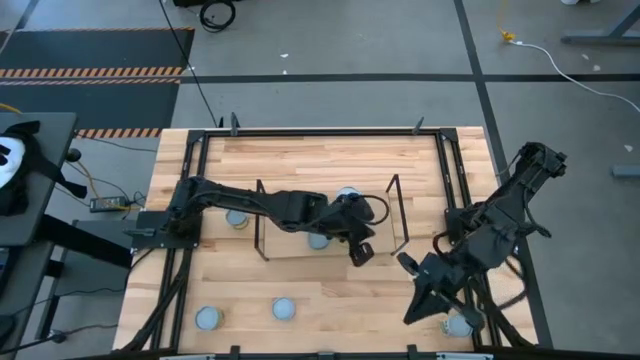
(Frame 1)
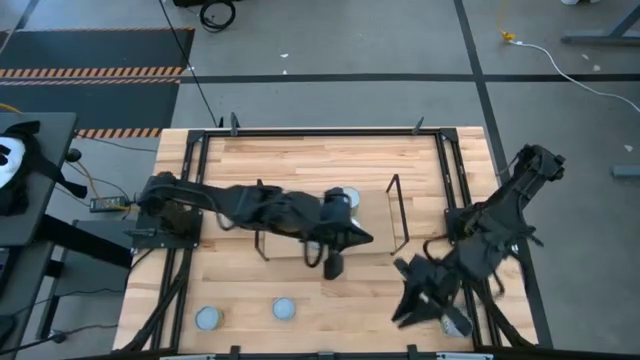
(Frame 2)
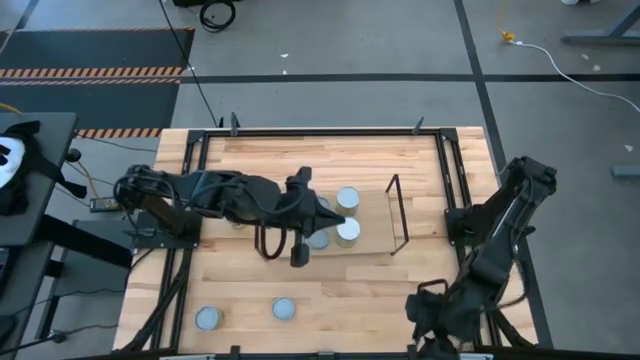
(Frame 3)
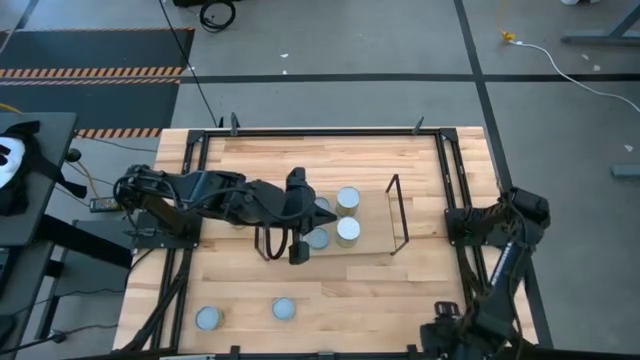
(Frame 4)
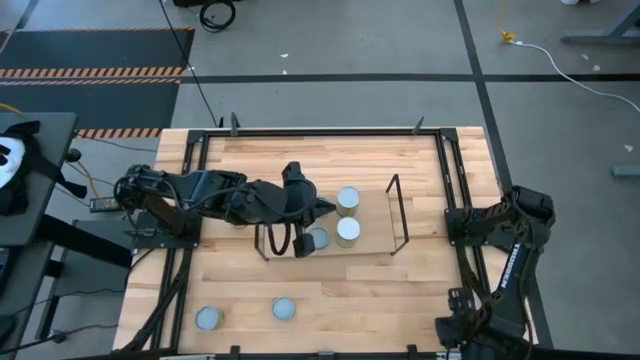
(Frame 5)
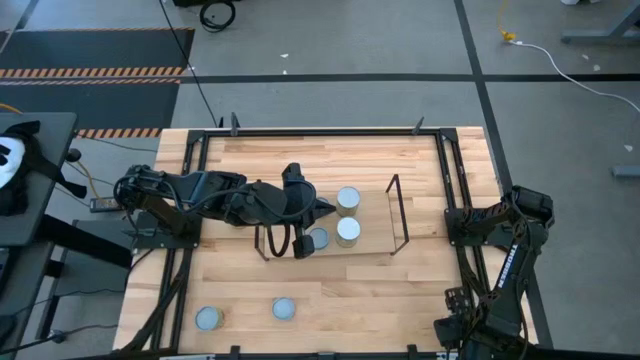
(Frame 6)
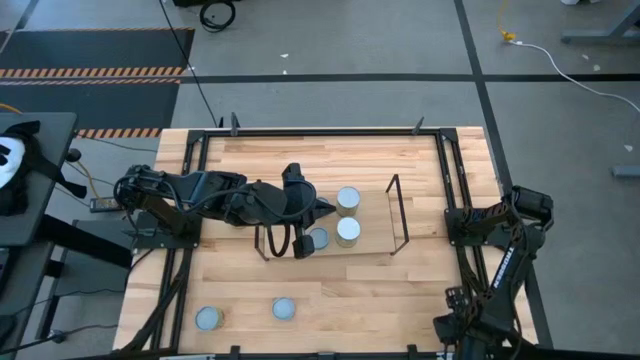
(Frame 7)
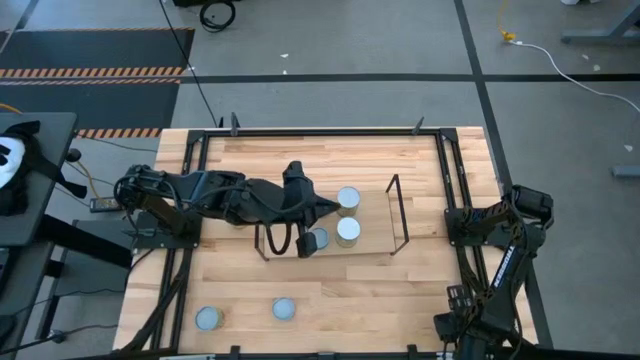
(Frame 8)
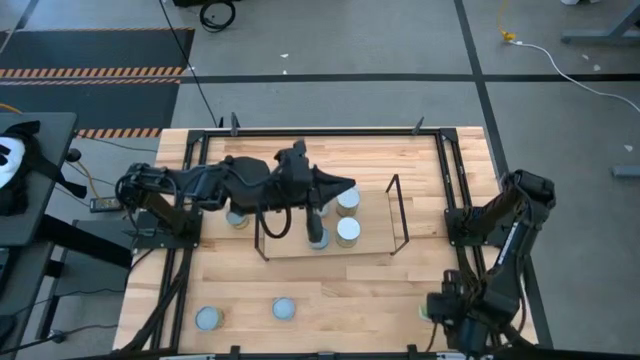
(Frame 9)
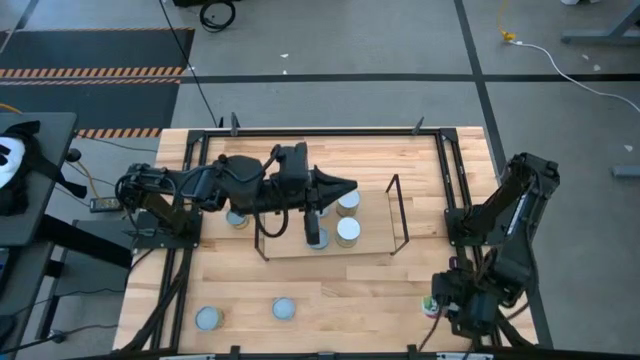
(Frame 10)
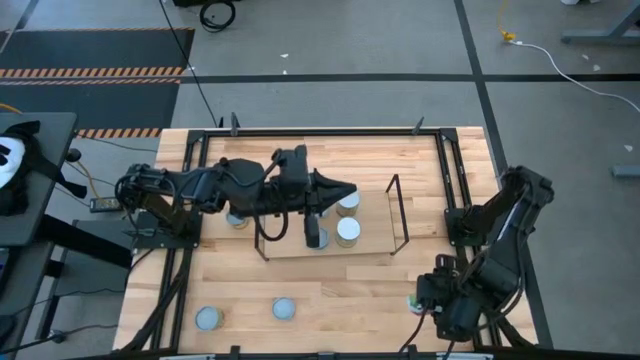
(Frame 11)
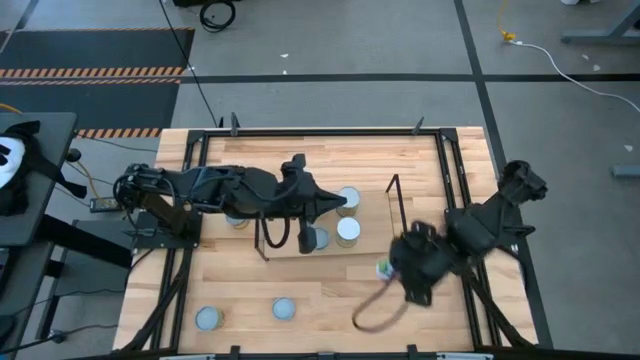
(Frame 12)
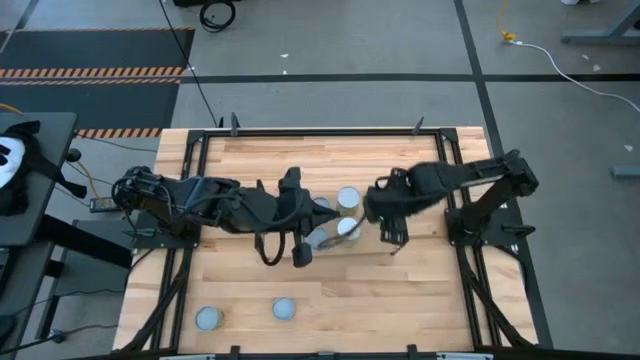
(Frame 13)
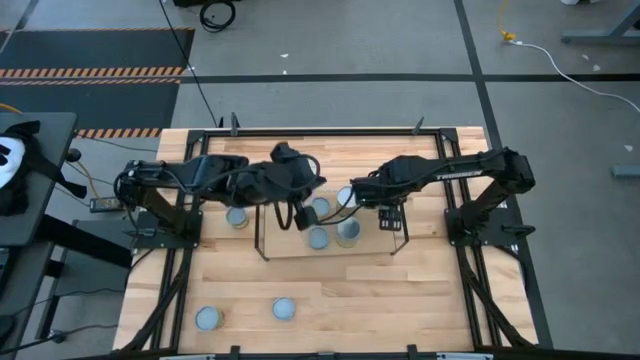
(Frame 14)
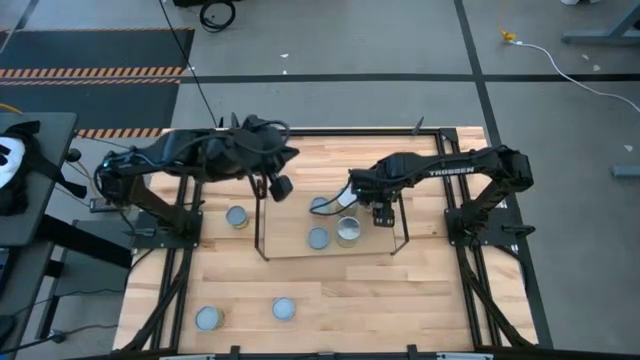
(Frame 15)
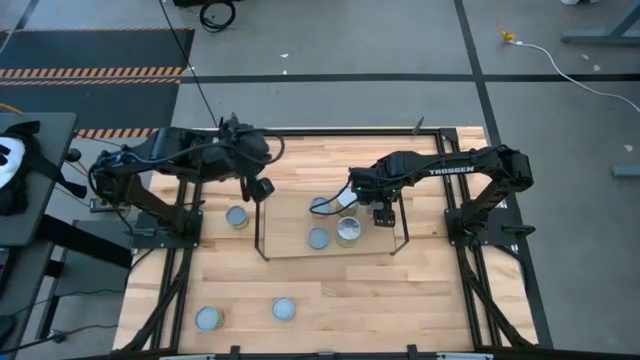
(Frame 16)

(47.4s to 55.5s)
Task: Pick and place cans onto a shelf
Put the canned mixed fruit on the shelf

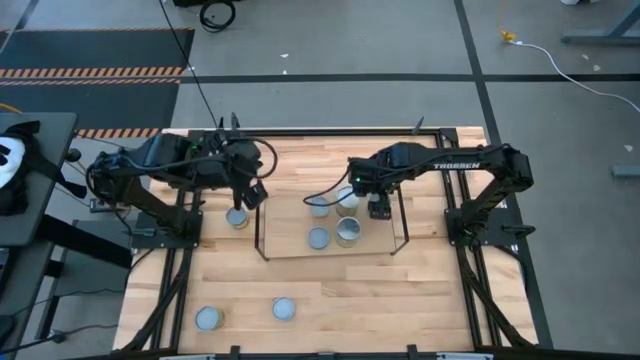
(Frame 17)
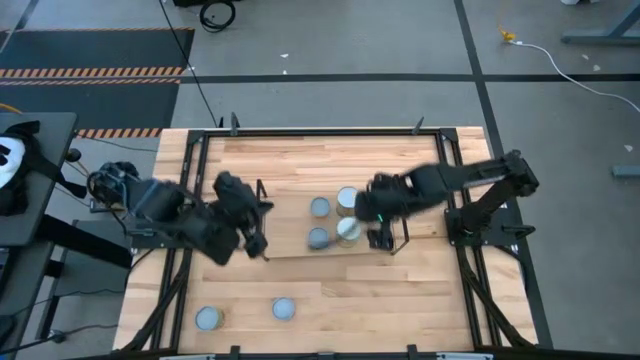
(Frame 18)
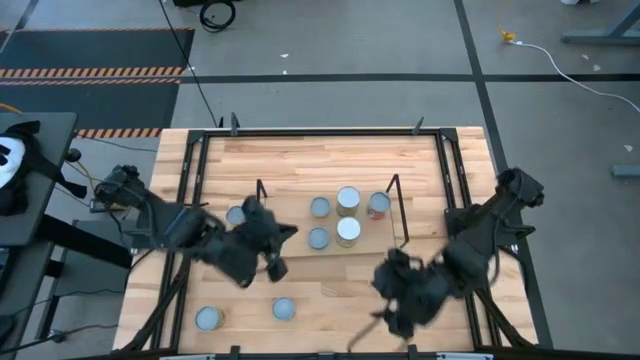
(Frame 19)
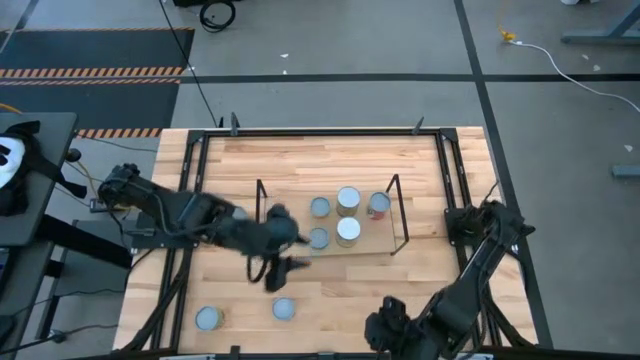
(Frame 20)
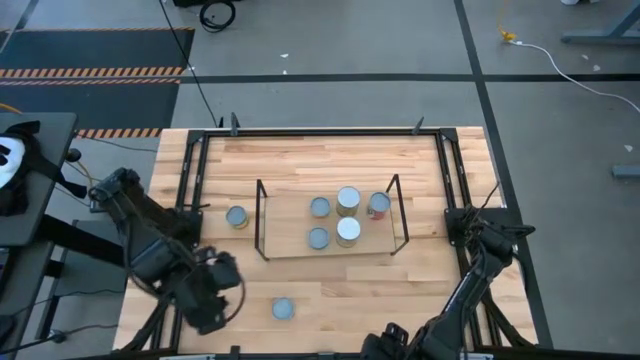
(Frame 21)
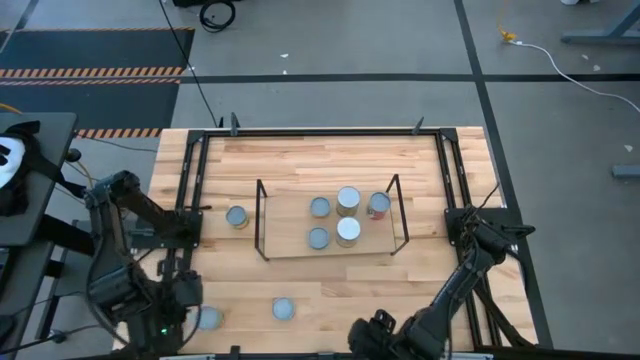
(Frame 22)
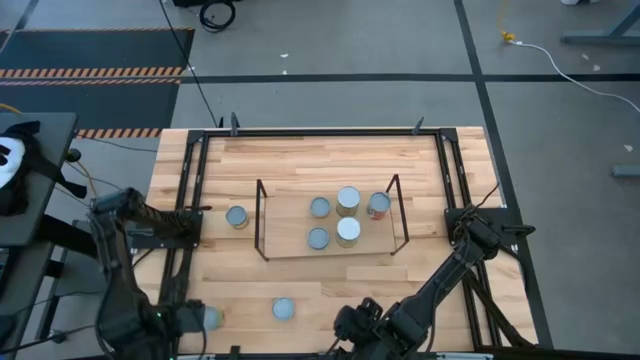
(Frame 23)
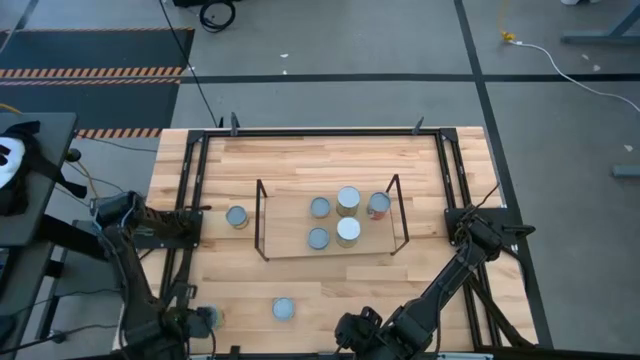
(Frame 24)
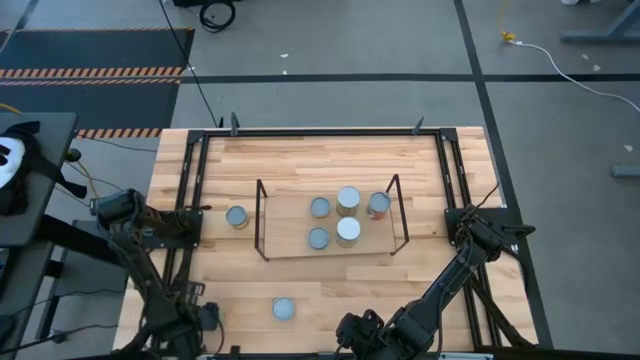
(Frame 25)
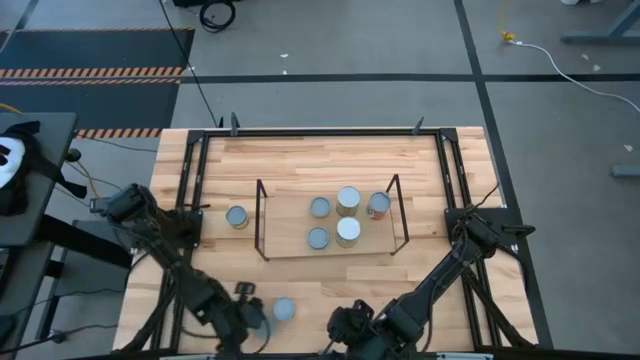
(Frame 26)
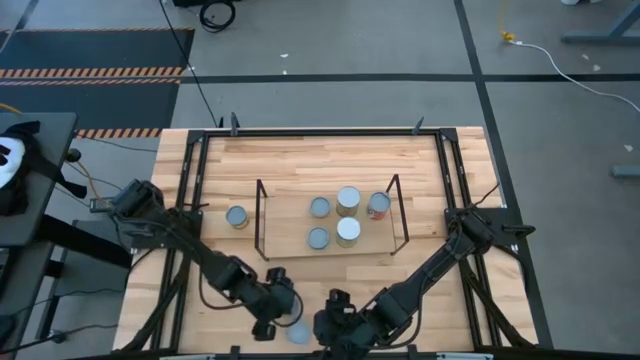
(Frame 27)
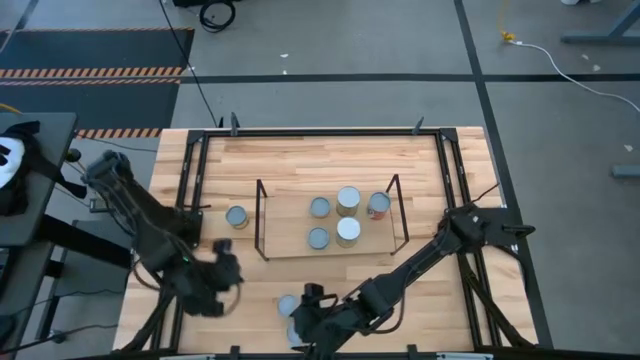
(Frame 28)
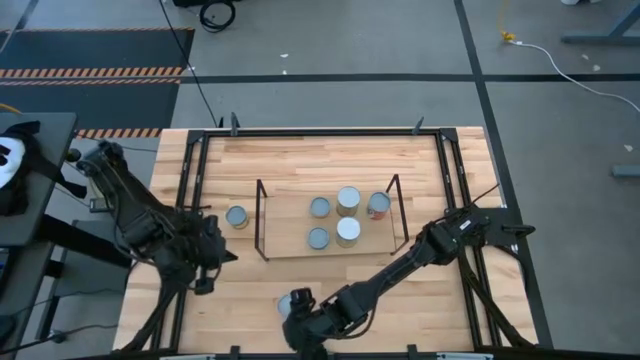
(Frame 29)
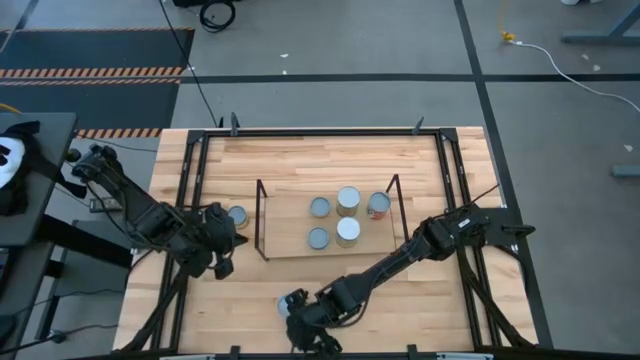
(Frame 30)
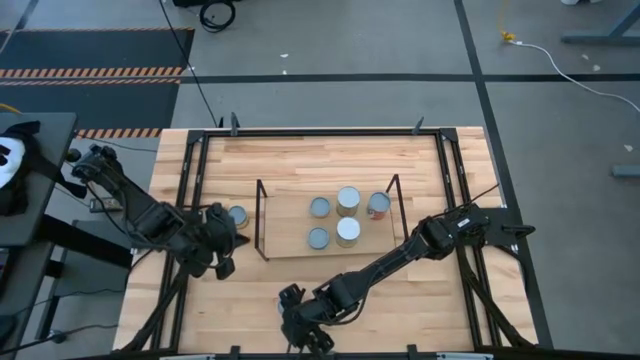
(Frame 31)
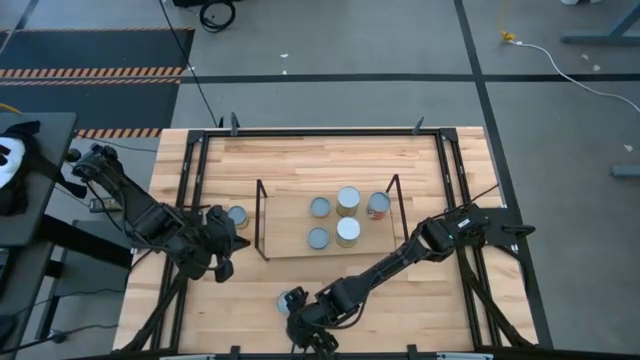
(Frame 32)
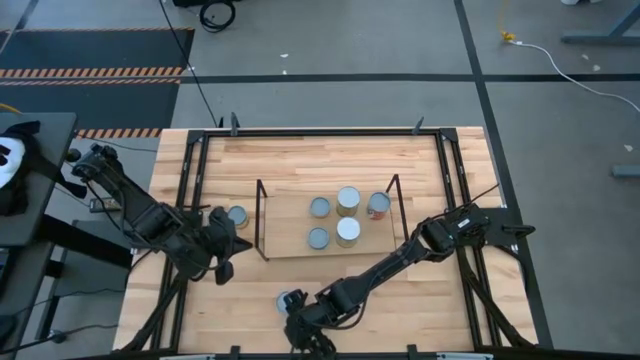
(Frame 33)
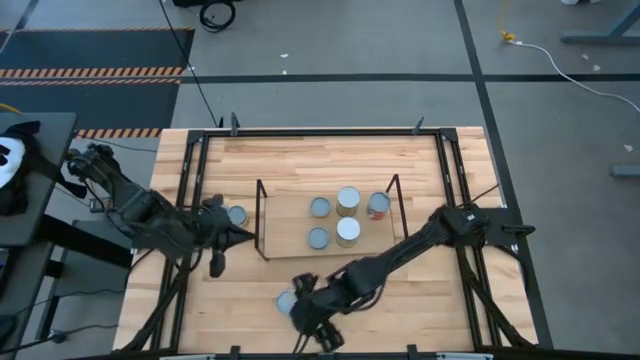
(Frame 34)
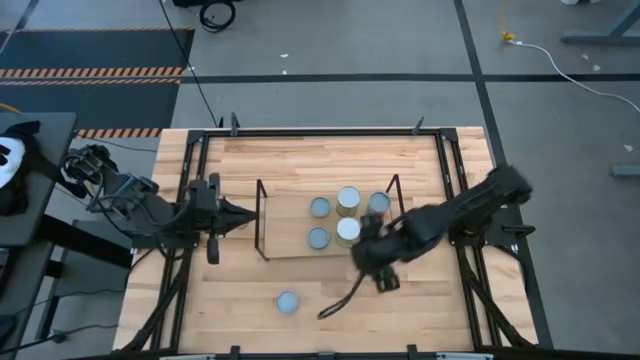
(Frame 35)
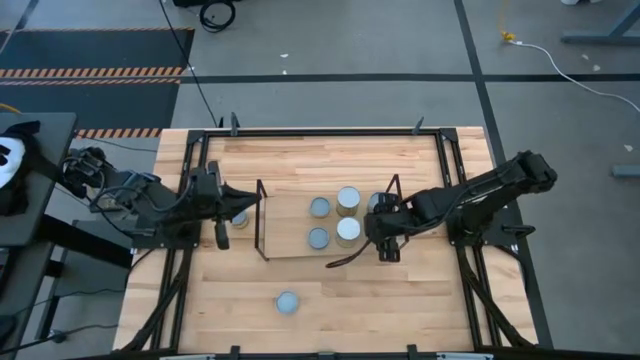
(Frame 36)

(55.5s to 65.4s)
Put the canned spaghetti on the shelf

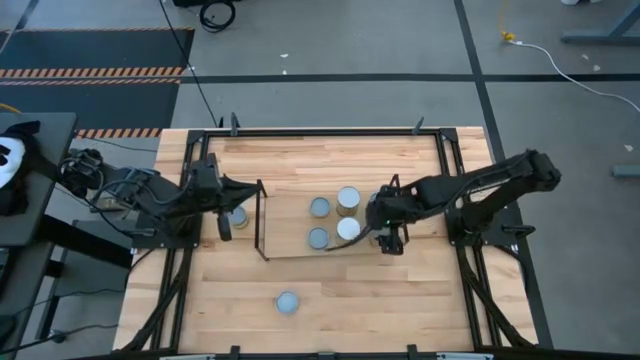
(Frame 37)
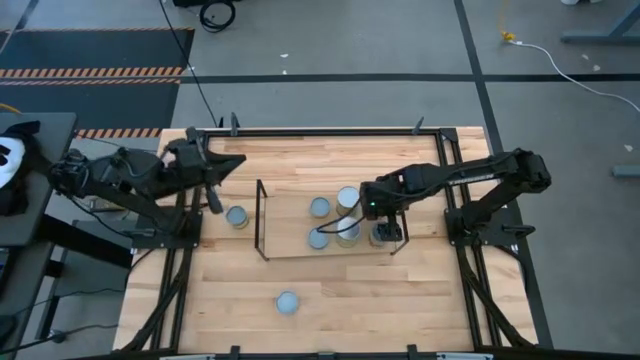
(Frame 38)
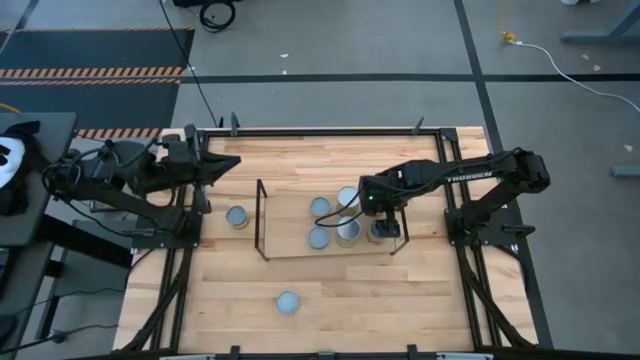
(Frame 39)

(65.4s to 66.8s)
Adjust the canned goods on the shelf

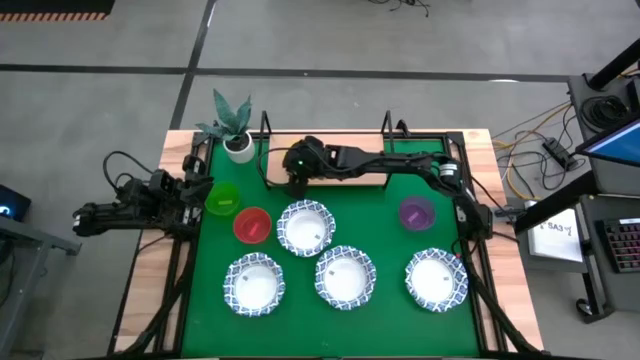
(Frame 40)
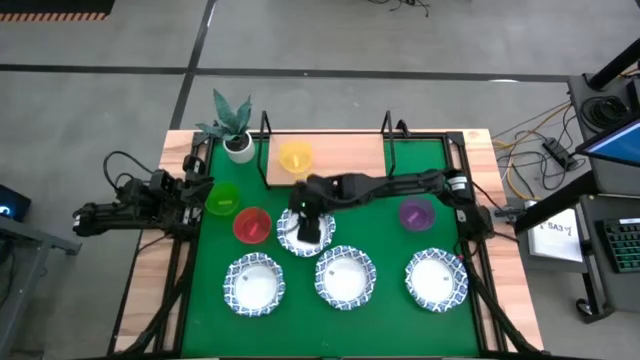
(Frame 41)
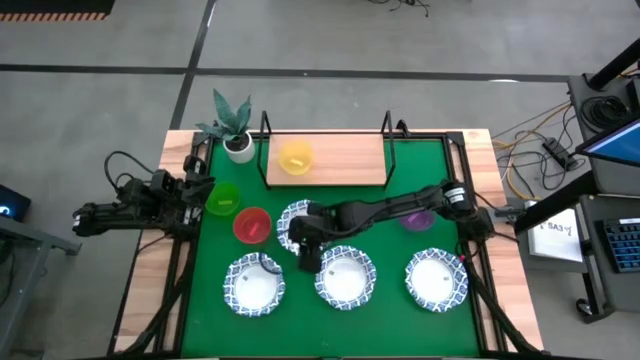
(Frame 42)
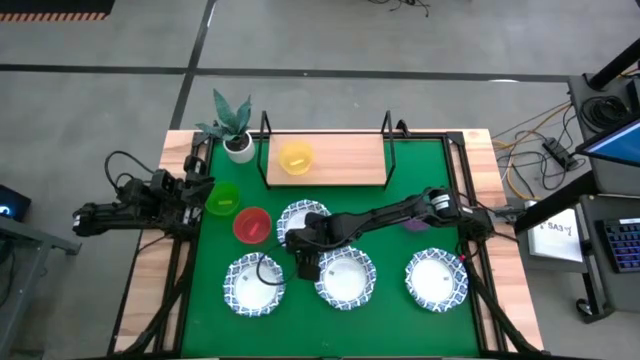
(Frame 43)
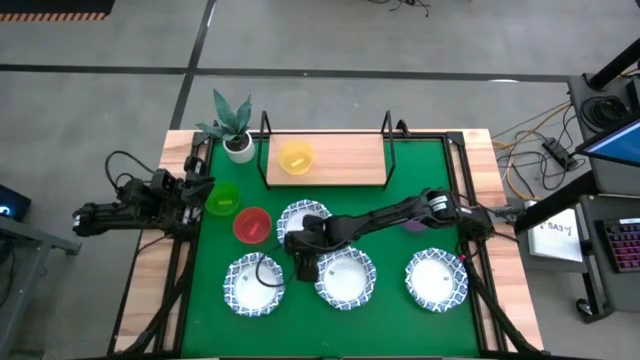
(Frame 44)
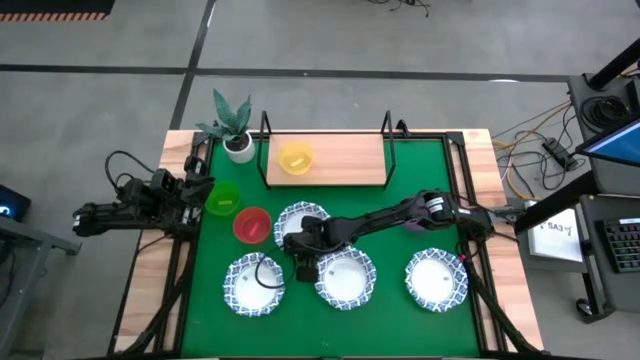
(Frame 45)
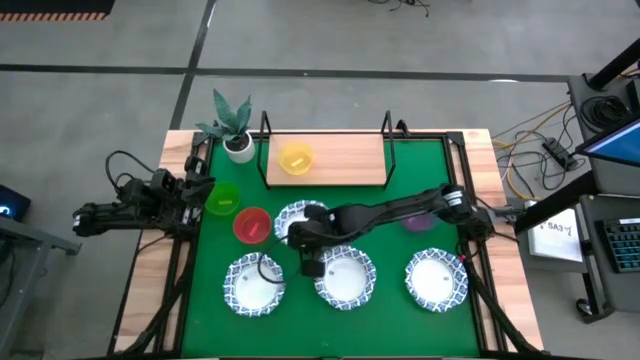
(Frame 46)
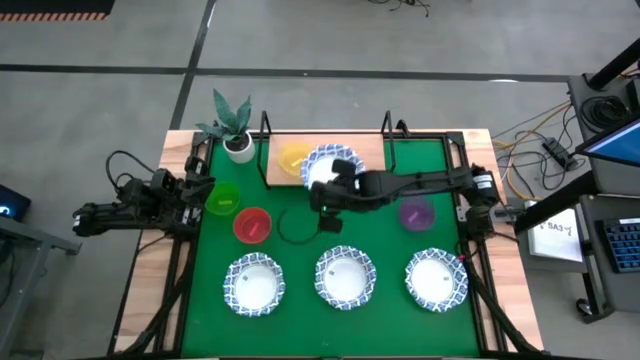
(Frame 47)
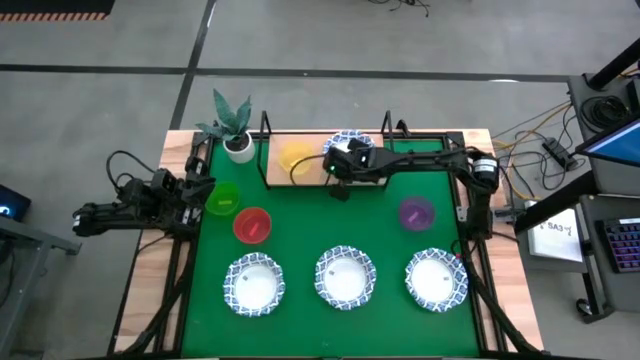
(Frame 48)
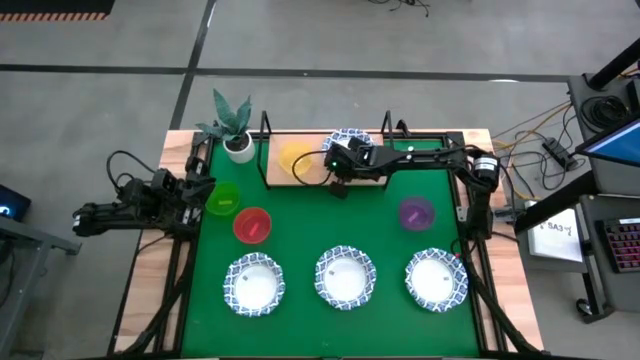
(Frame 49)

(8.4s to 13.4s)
Task: Place and stack bowls onto a shelf
Put the blue patterned bowl on the shelf
